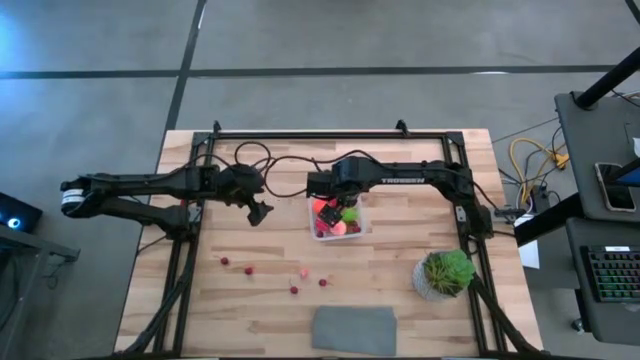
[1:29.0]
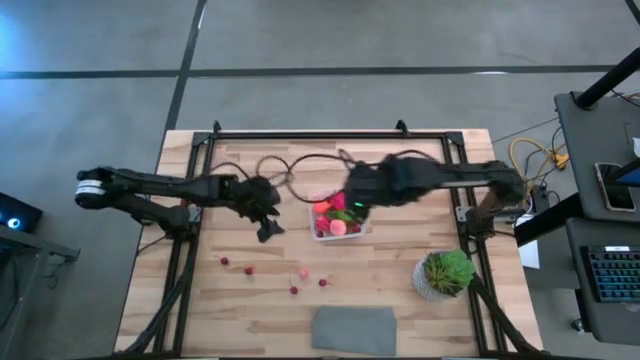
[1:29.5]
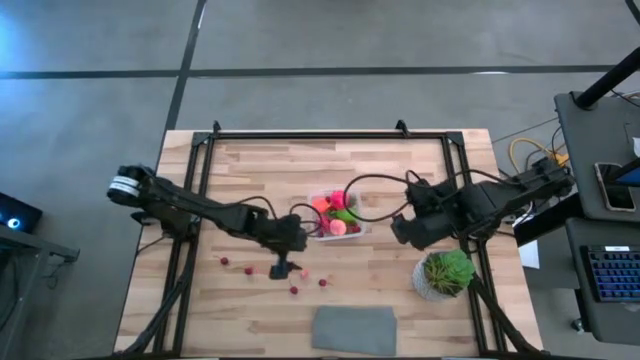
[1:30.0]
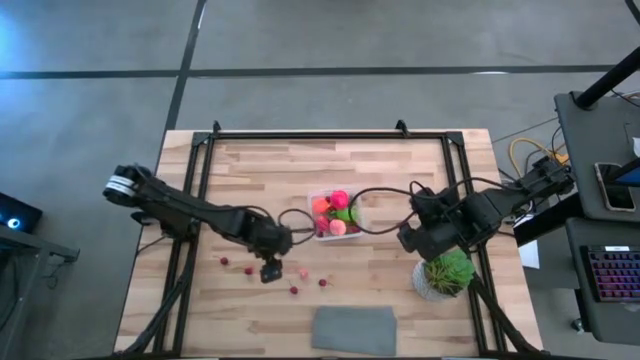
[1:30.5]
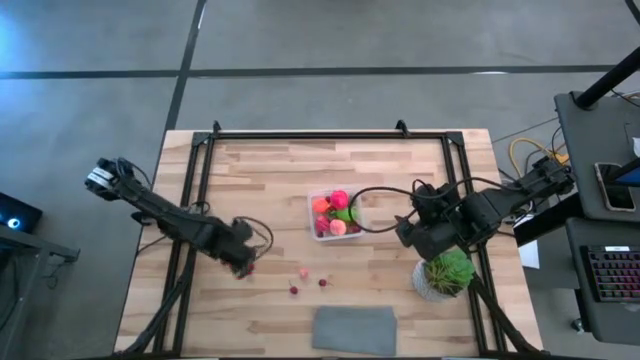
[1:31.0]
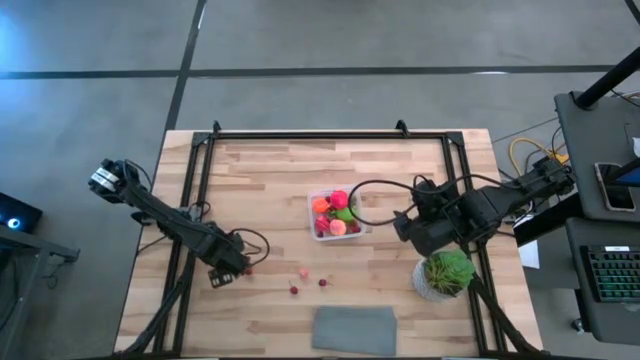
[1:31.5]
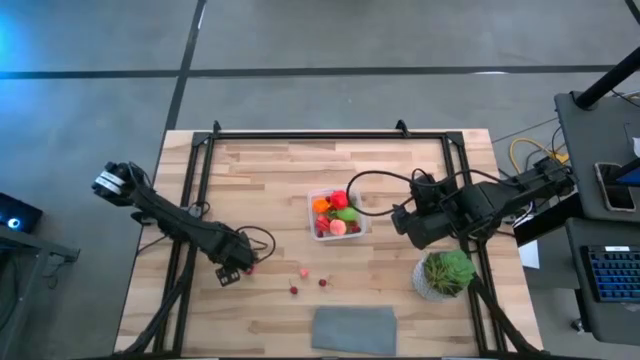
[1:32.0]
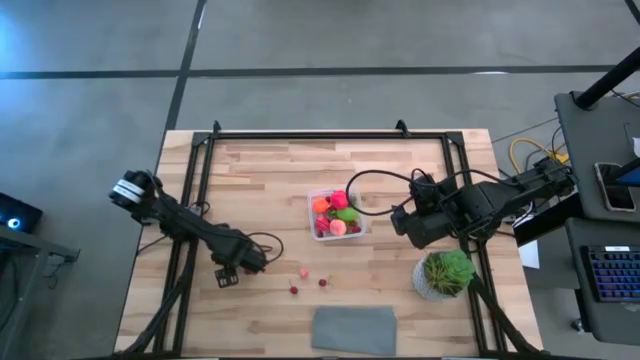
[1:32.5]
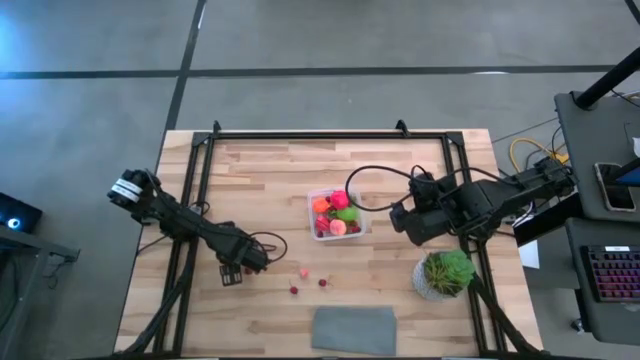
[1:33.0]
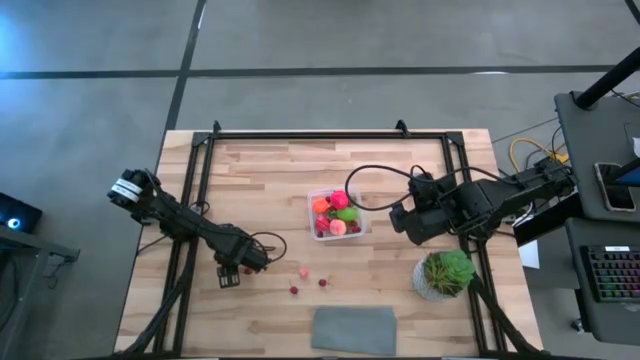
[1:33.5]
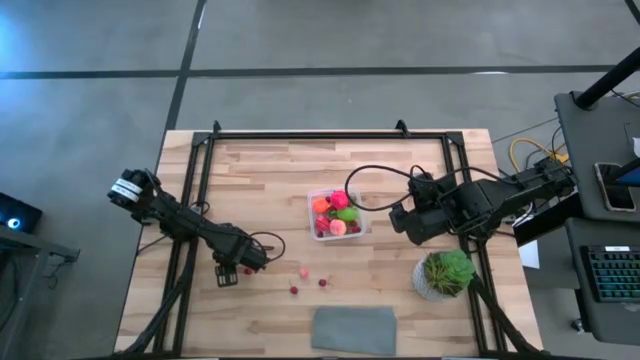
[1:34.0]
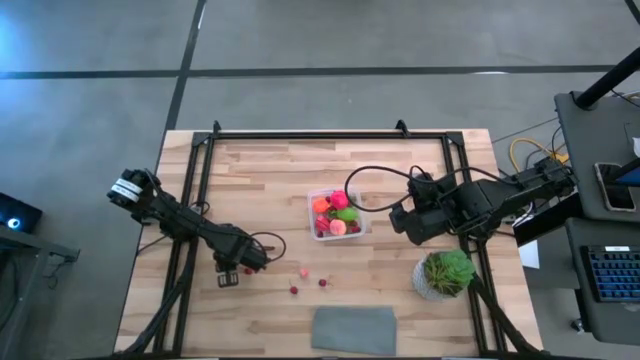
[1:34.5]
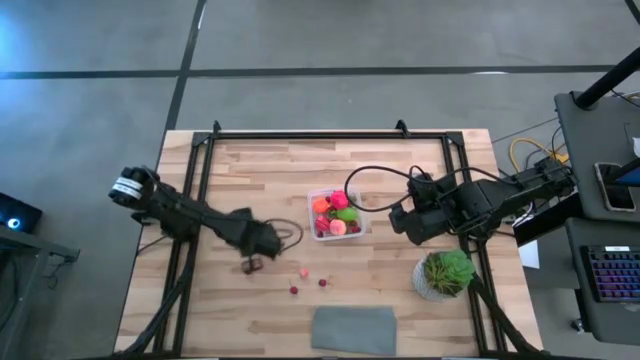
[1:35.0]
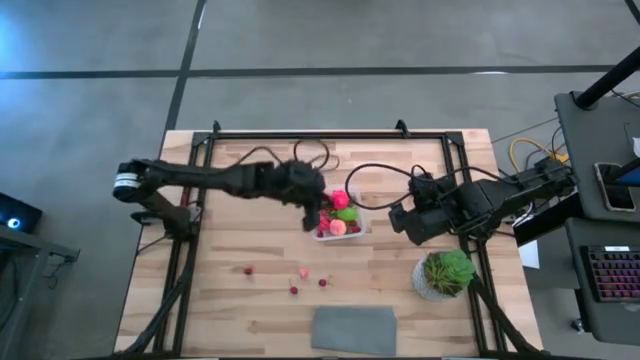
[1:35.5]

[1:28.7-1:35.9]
Task: Pick and placing Produce into tupperware
Put the red cherry into the transparent container

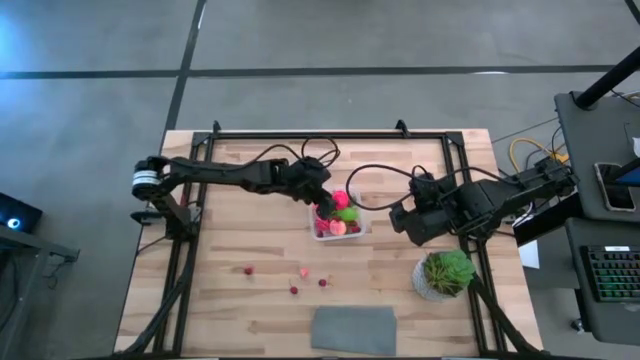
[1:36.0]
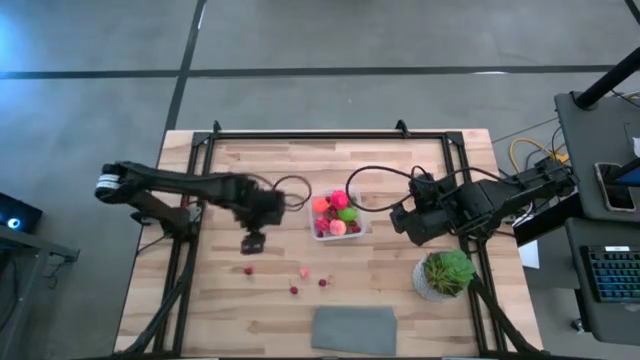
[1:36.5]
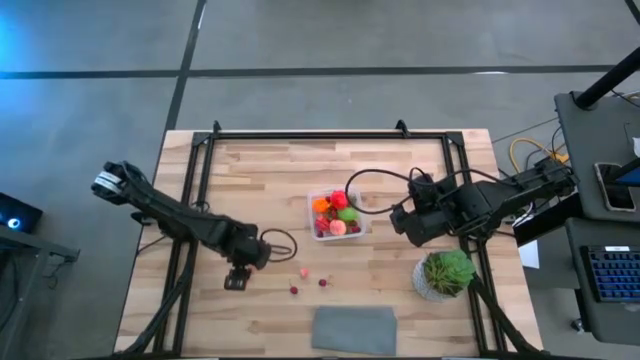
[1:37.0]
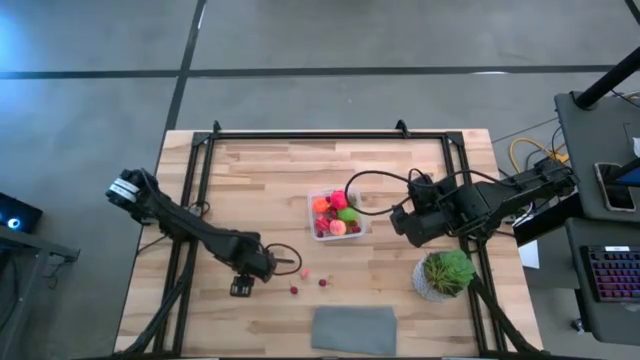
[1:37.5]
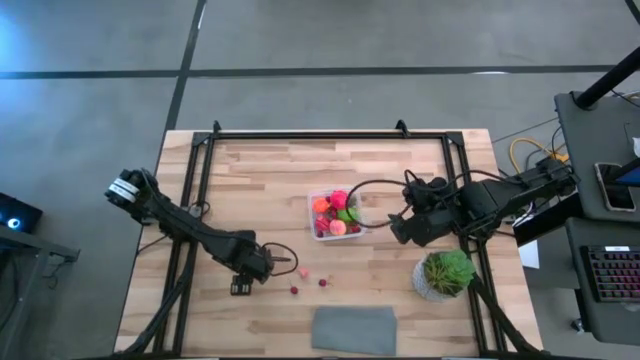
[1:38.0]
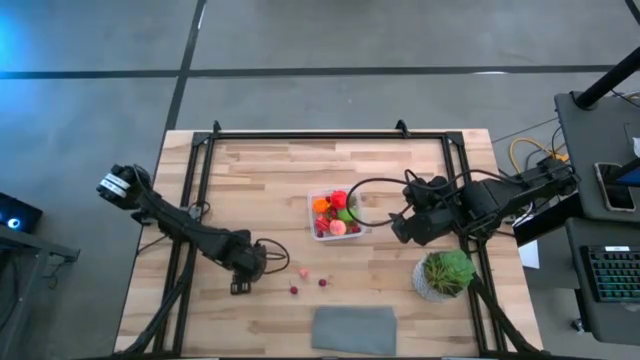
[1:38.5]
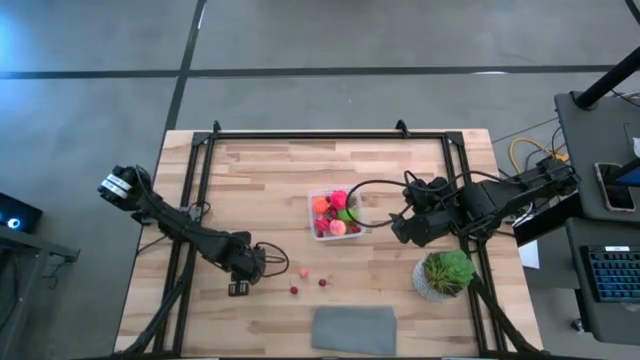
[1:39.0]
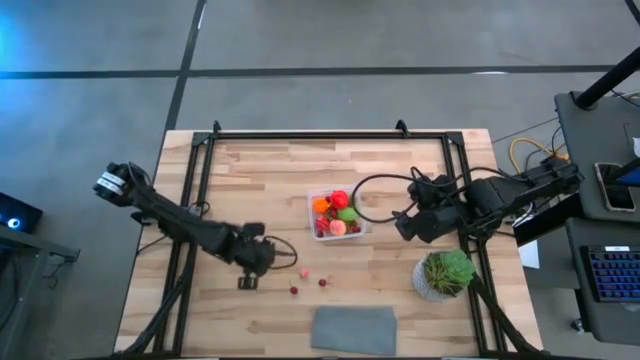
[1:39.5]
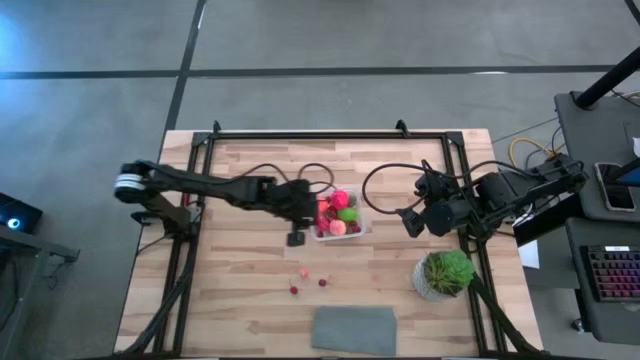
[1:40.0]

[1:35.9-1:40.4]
Put the red cherry into the transparent container

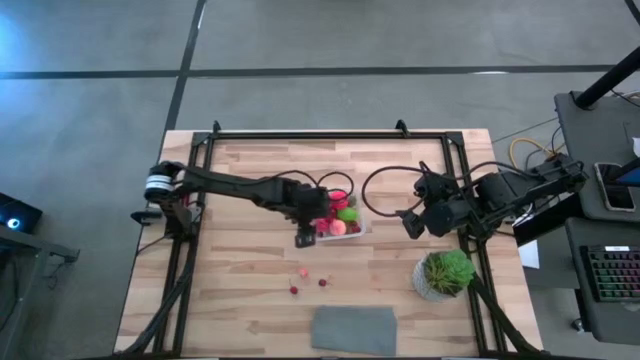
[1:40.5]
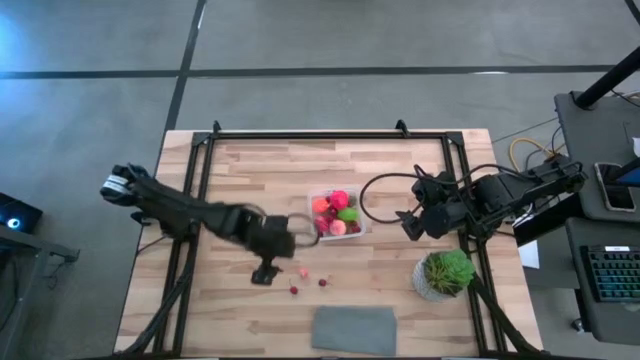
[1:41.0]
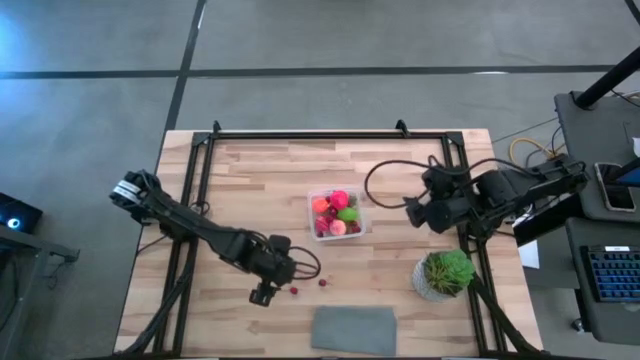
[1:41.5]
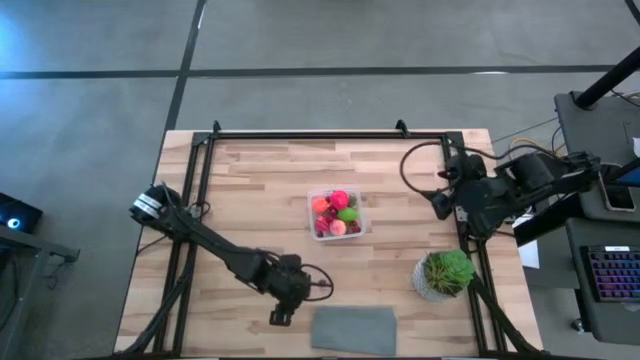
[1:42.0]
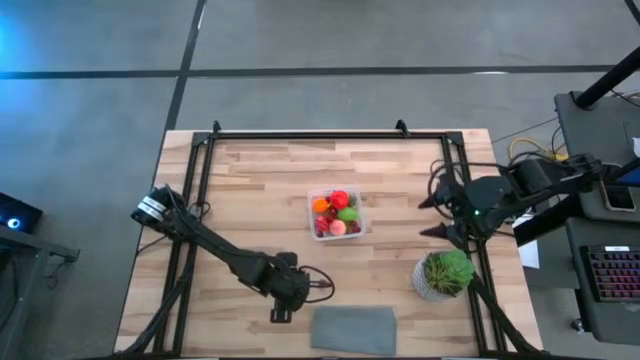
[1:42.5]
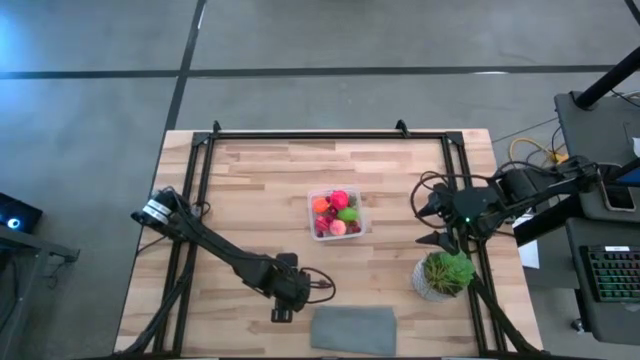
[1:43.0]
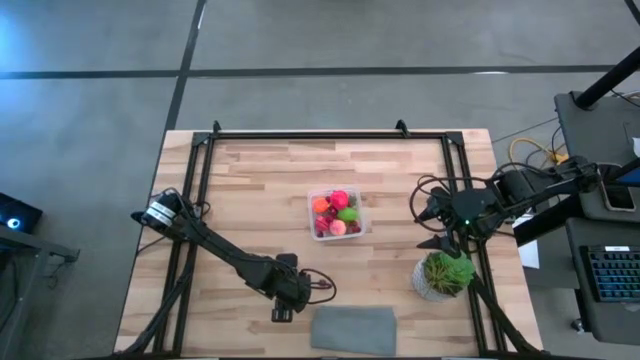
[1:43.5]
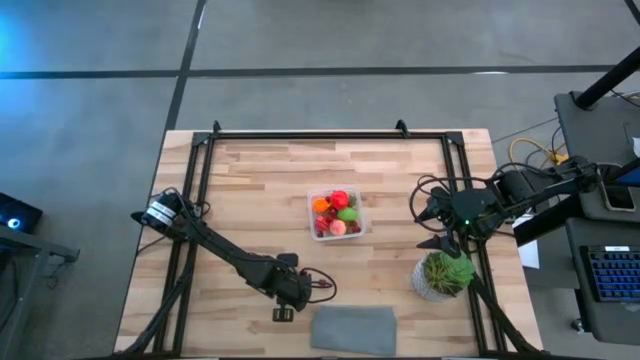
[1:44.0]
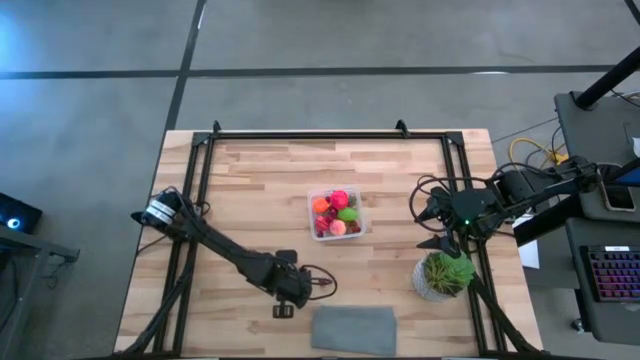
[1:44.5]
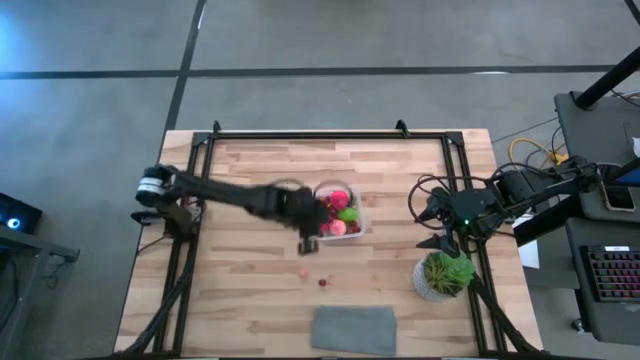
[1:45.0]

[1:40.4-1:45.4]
Put the red cherry into the transparent container

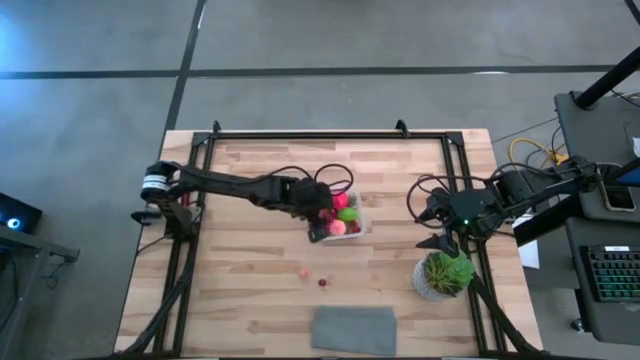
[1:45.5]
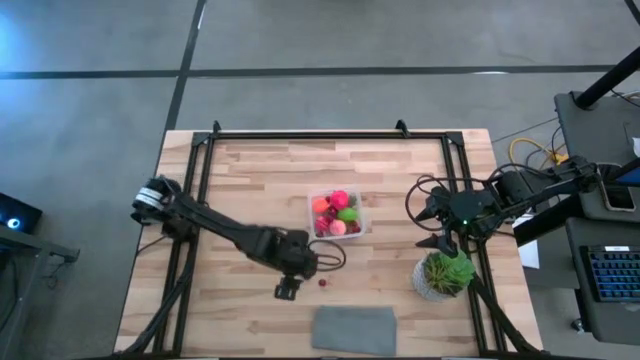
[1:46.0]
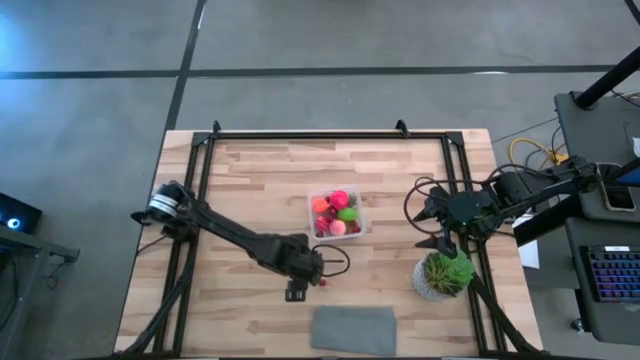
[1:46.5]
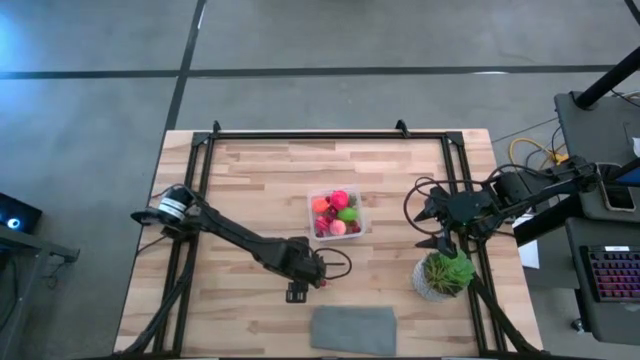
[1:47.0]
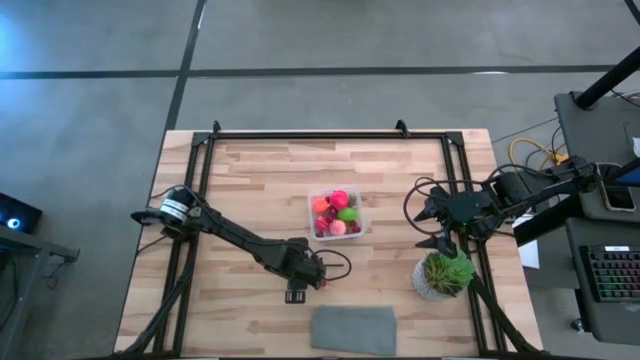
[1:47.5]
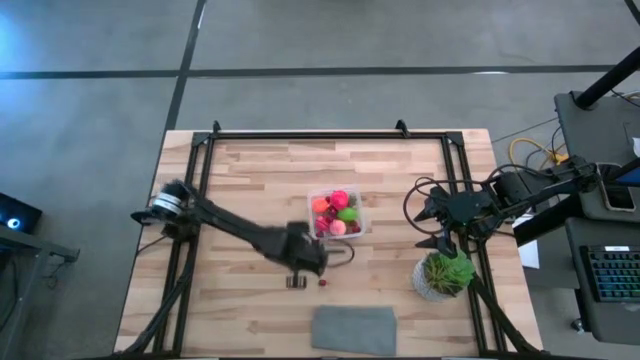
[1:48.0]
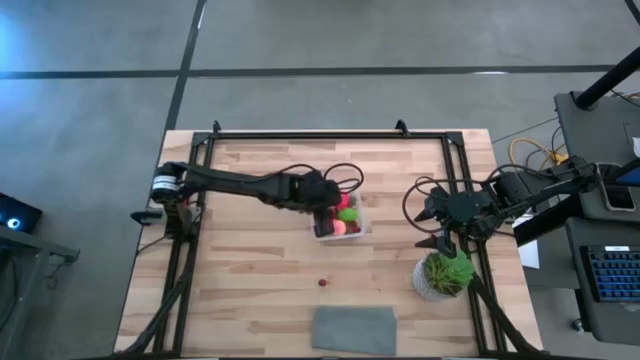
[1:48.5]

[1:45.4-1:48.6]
Put the pink peach into the transparent container
